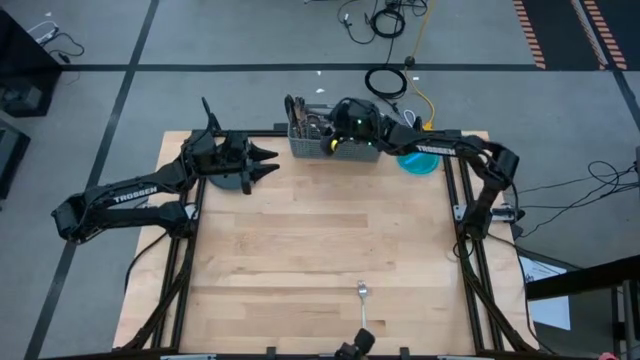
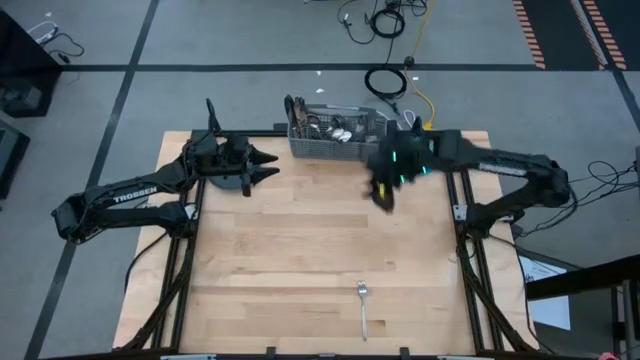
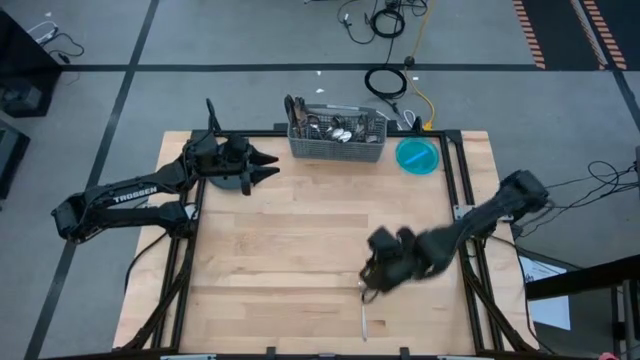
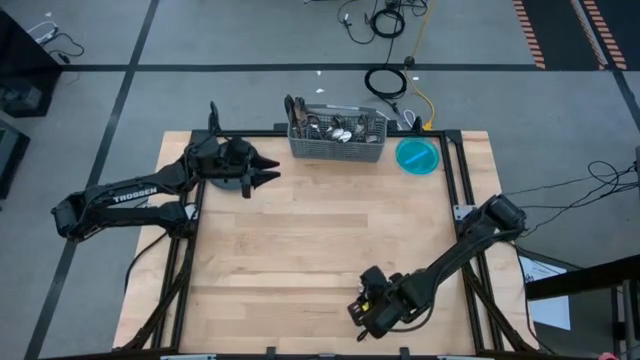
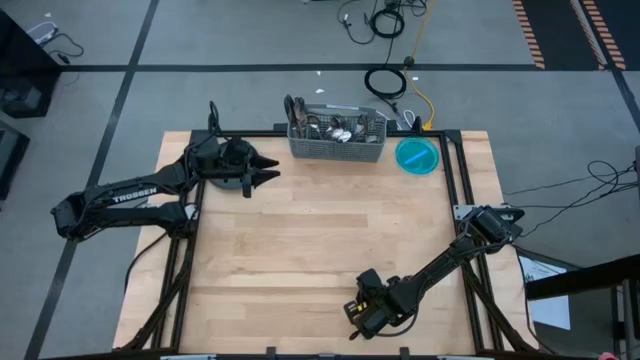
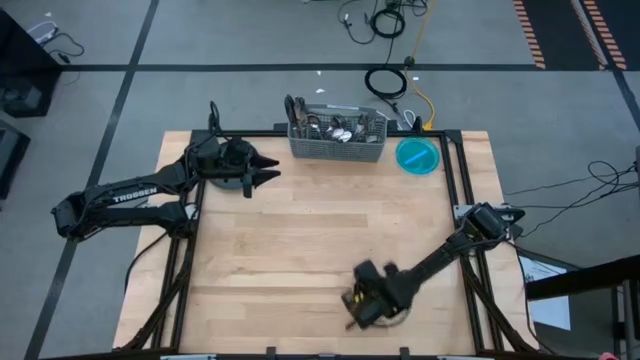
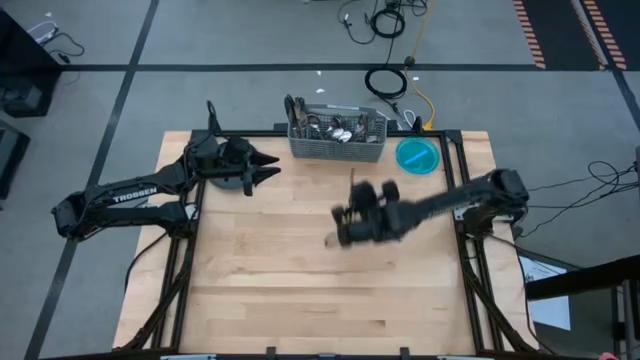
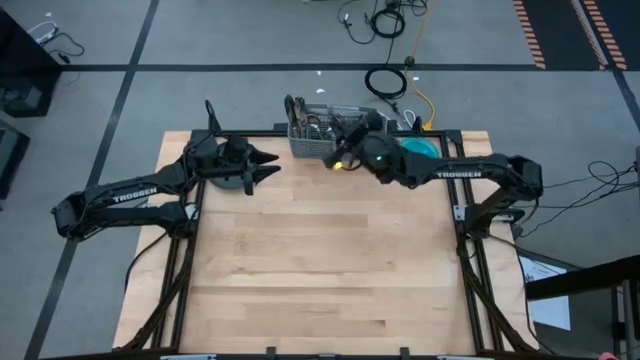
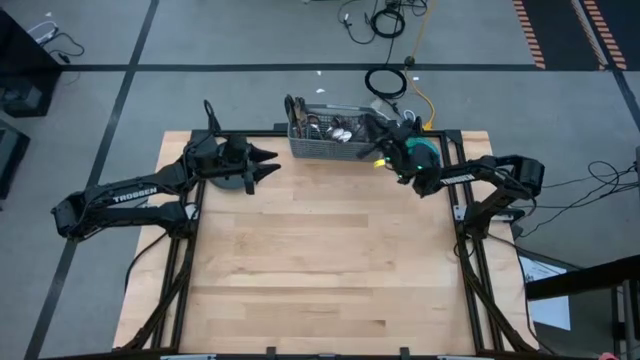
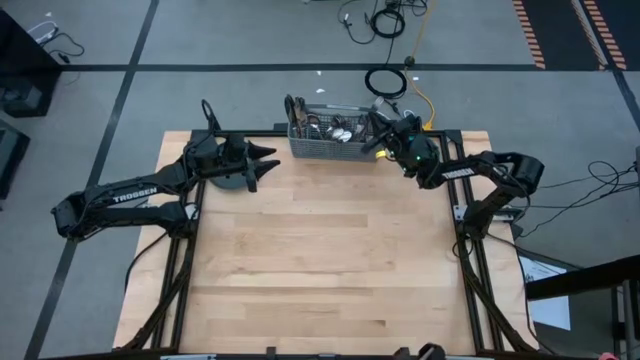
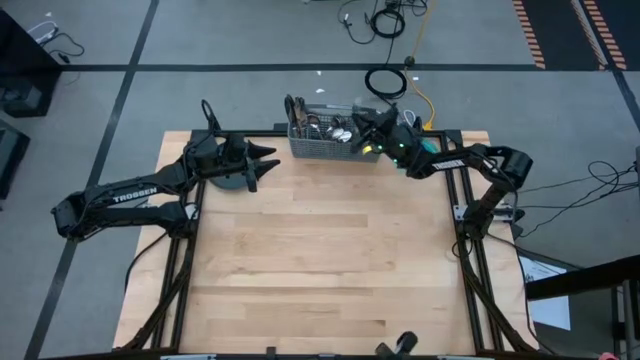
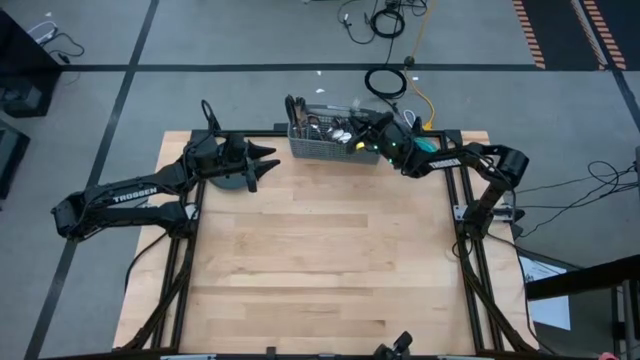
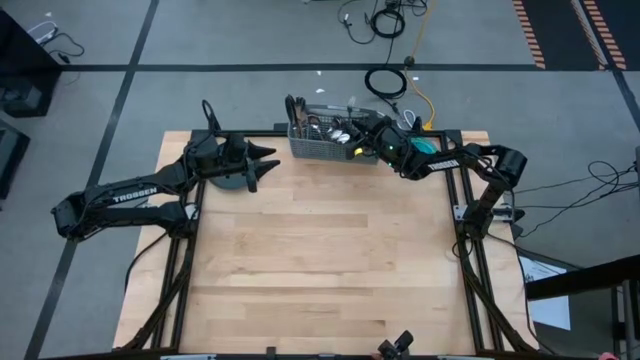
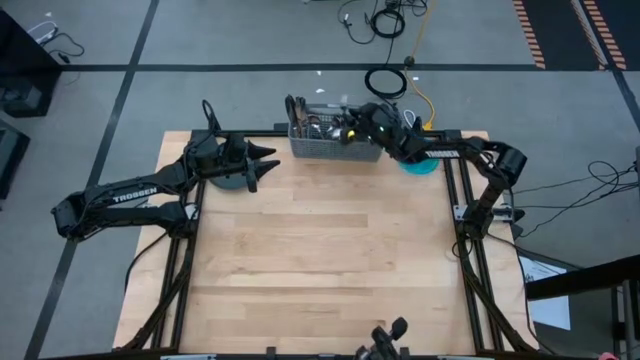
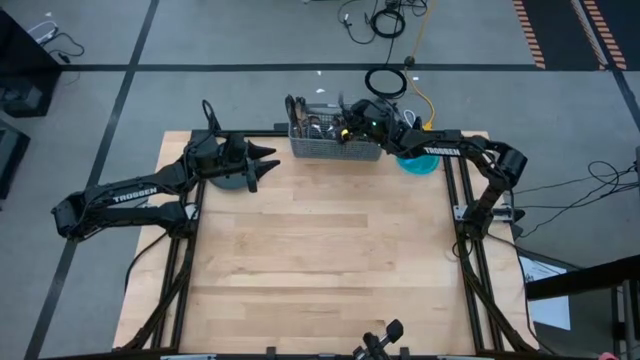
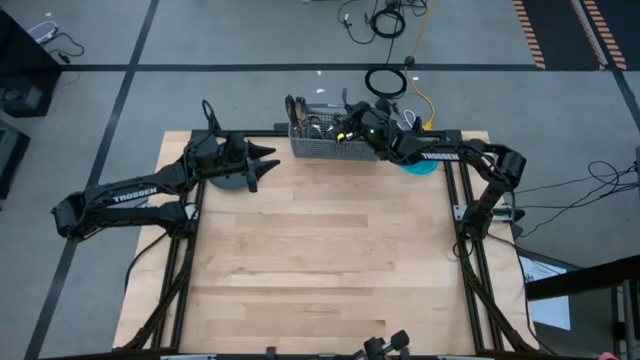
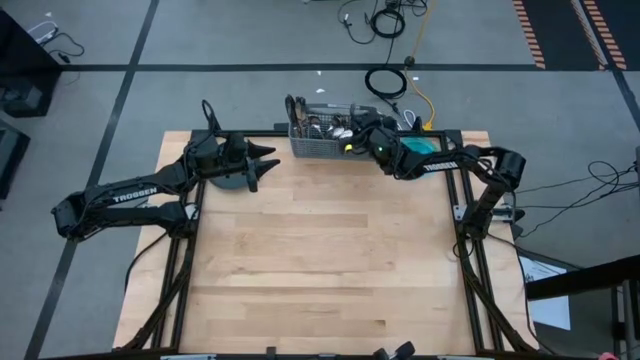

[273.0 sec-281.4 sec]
Task: Sort silverware
Put the fork into the silverware organizer

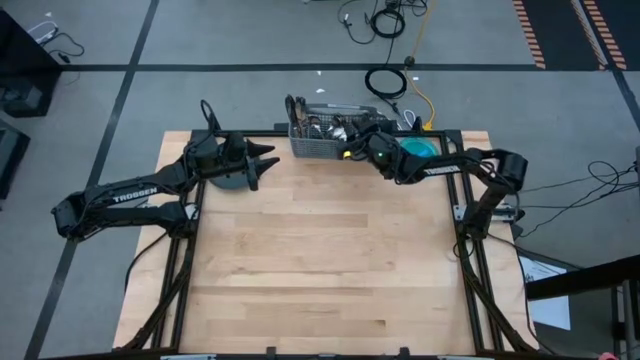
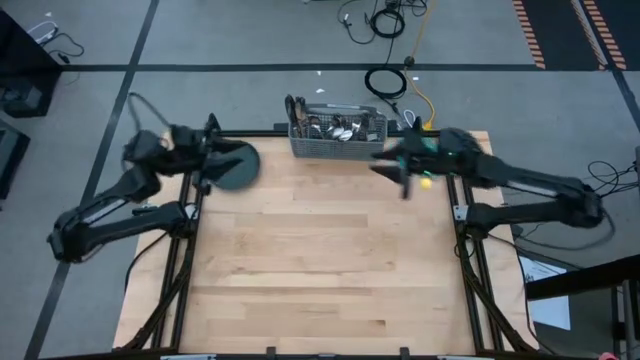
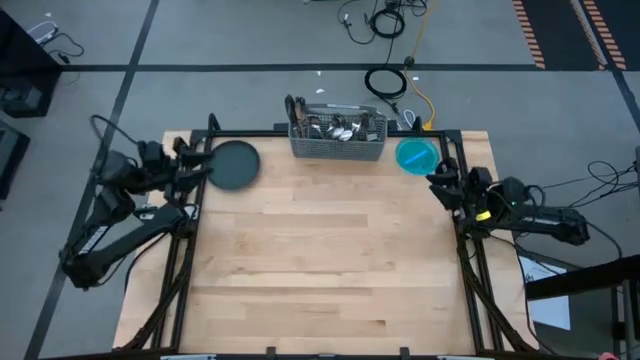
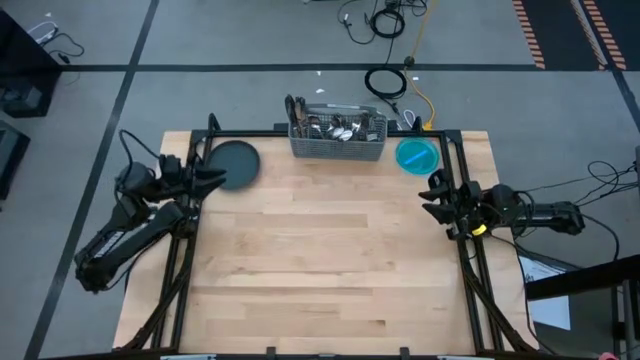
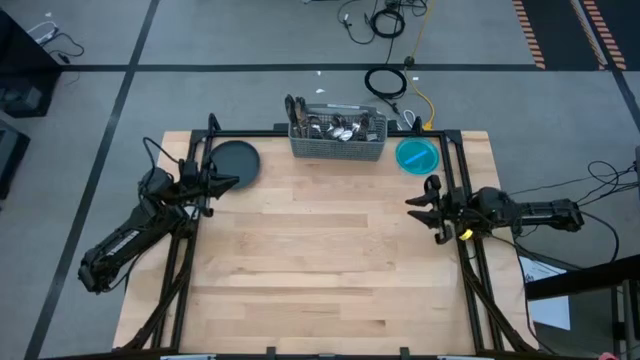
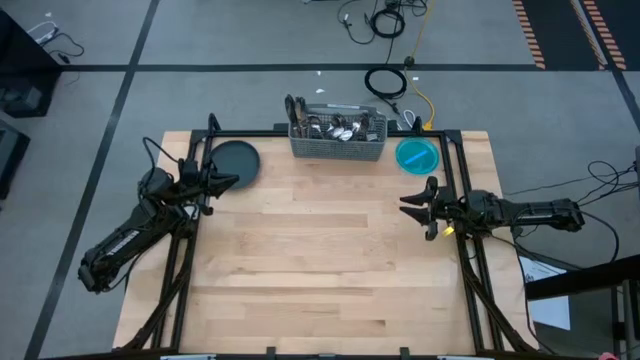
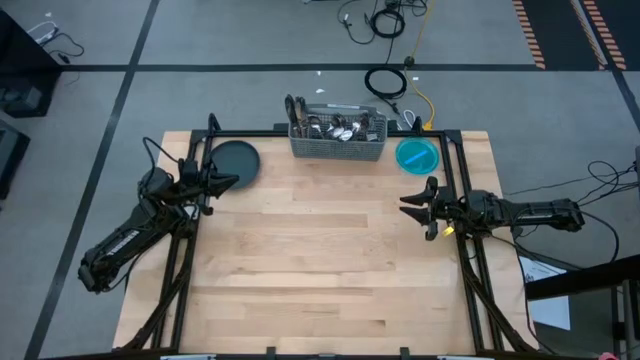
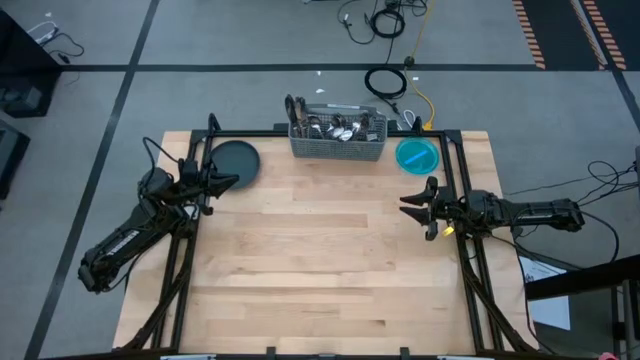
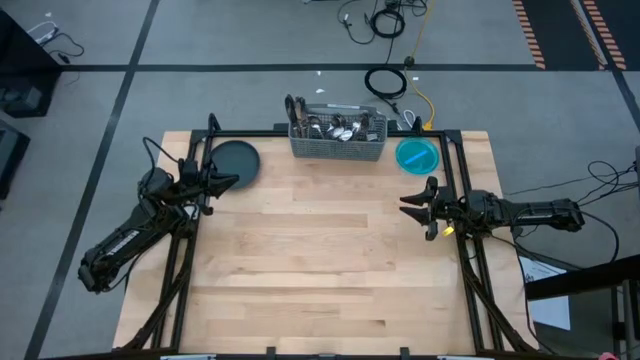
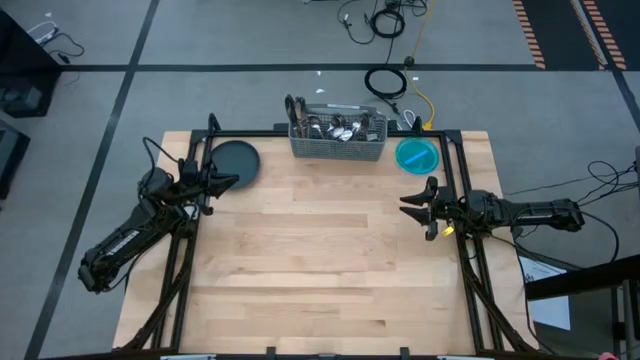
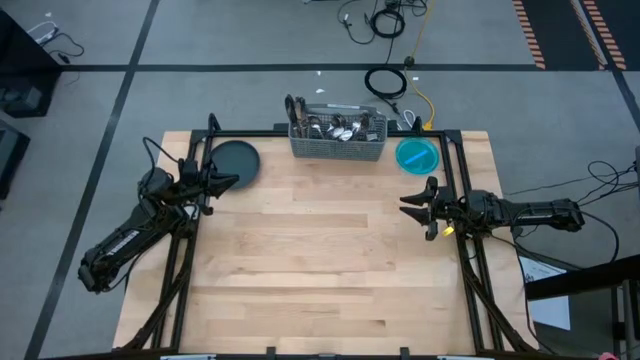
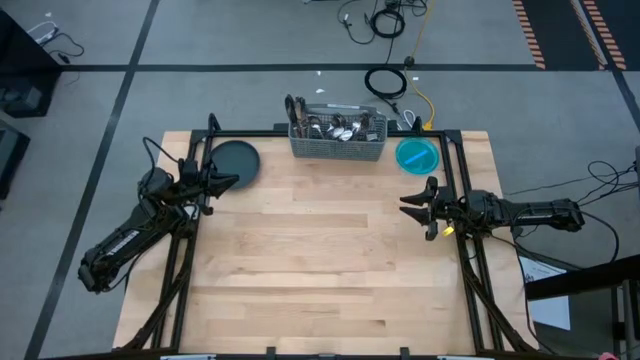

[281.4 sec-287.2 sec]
Return to Home Position

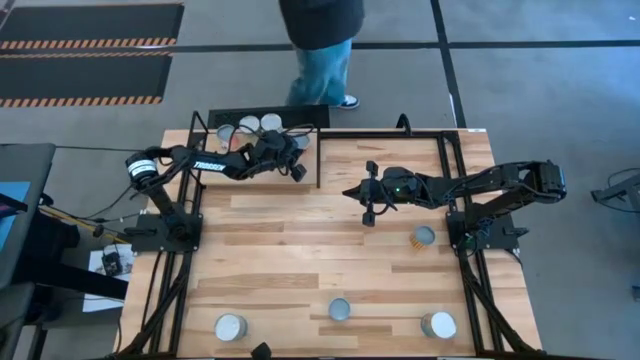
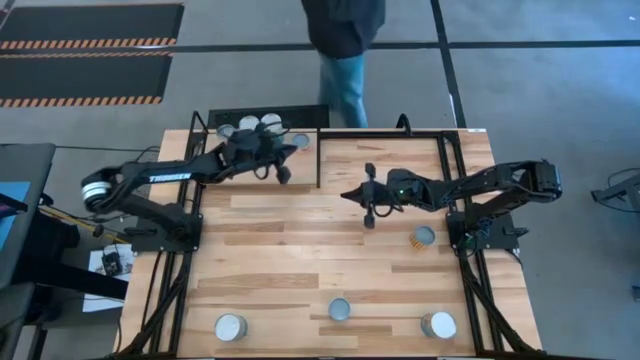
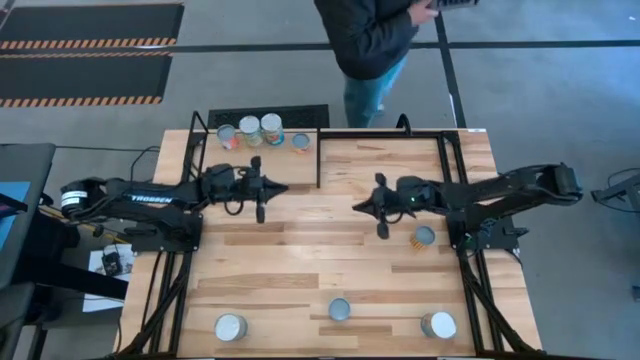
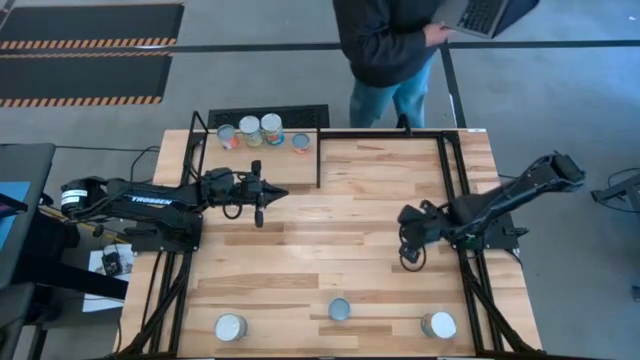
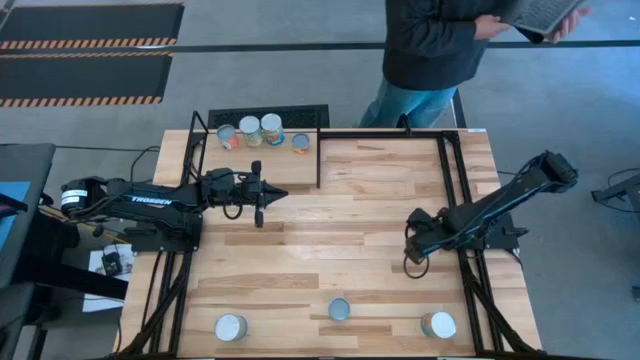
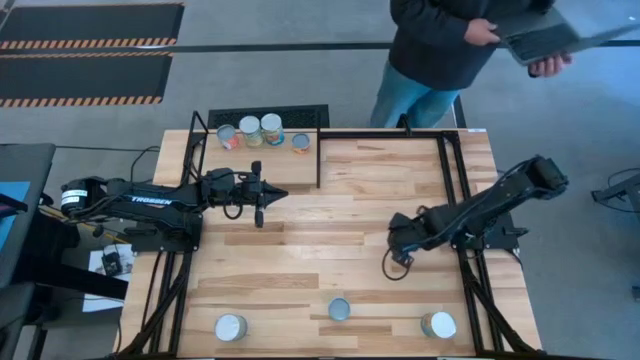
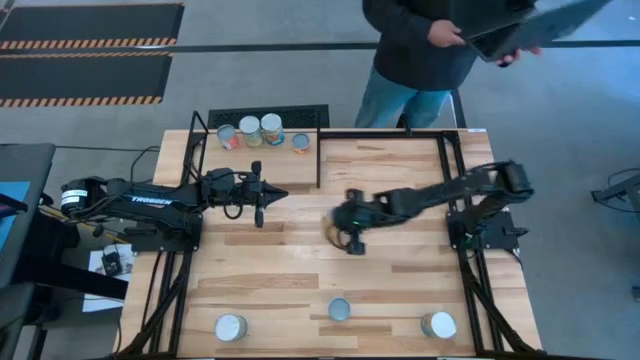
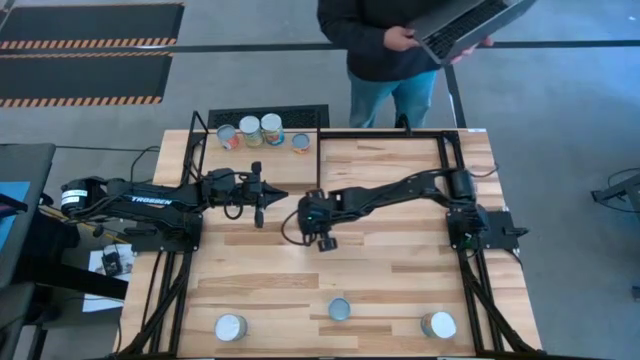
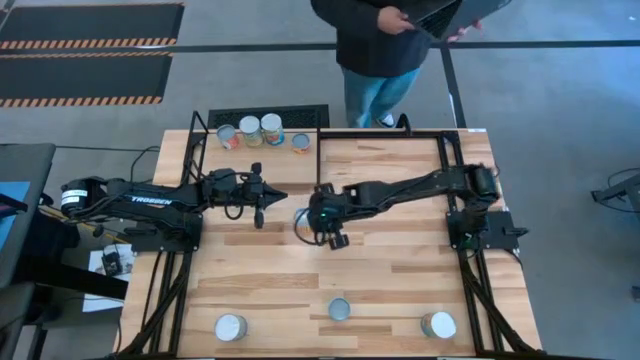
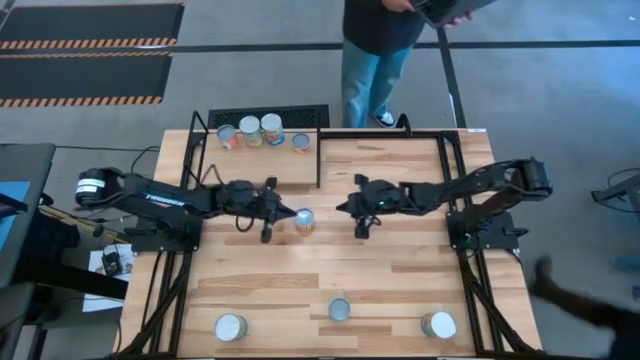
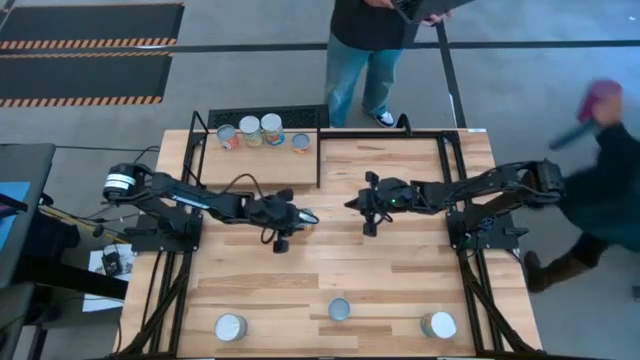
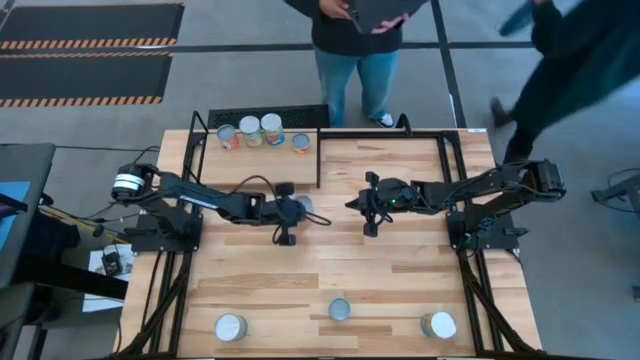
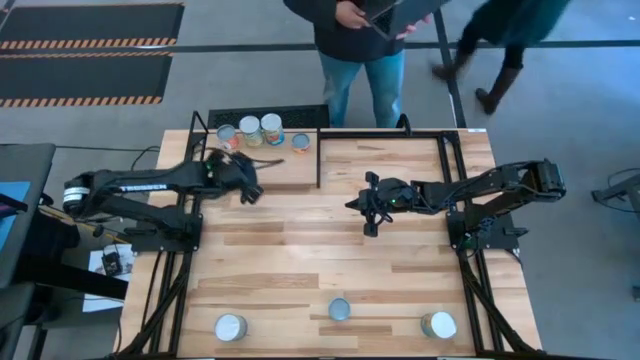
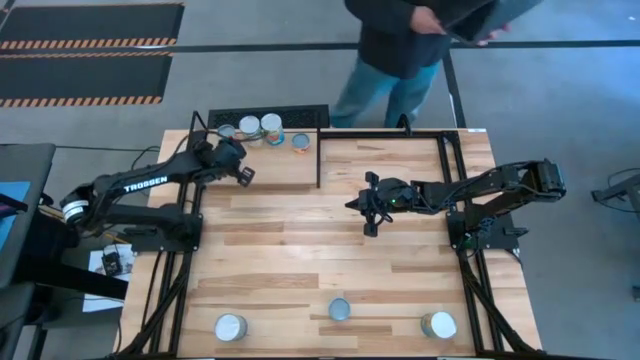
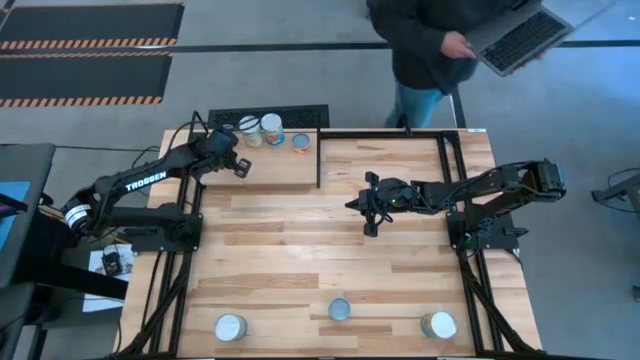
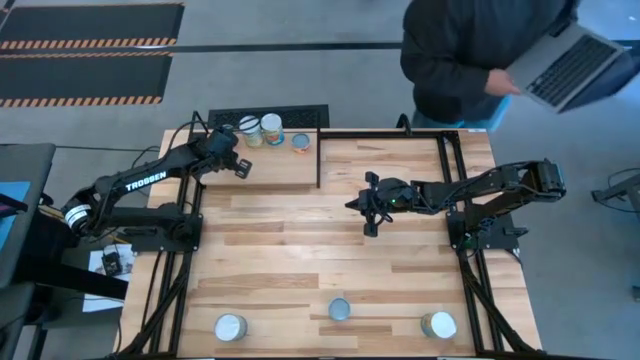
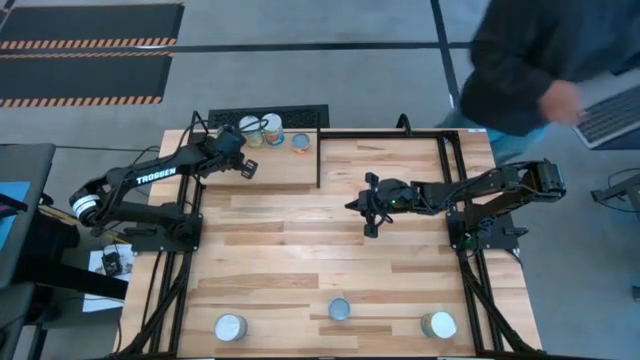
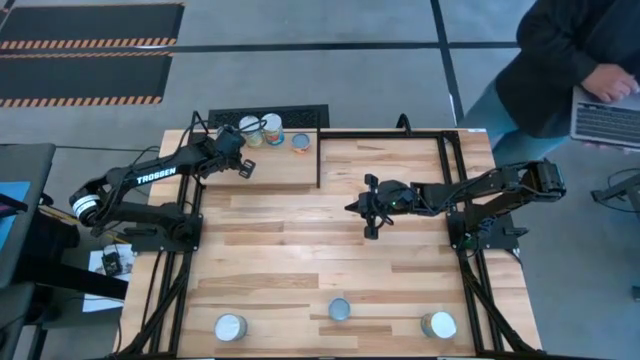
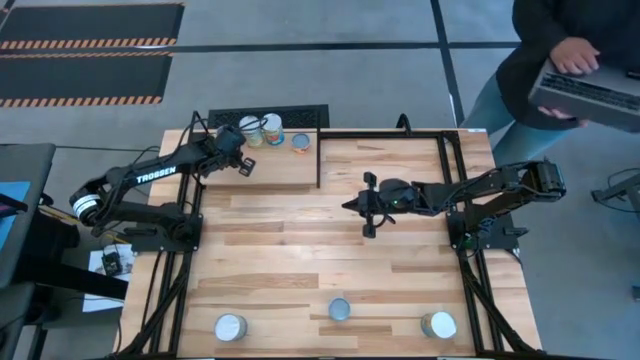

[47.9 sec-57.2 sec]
Task: Pick and place cans onto a shelf
Put the small canned black beans on the shelf aligned with the other small canned diced tomatoes
